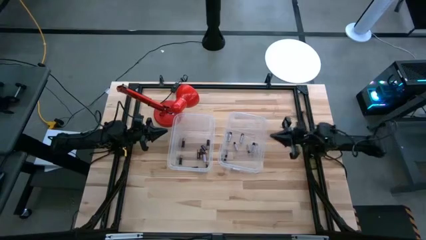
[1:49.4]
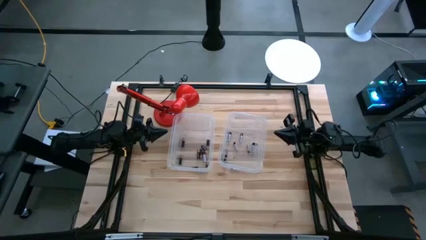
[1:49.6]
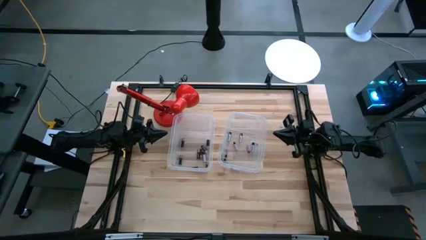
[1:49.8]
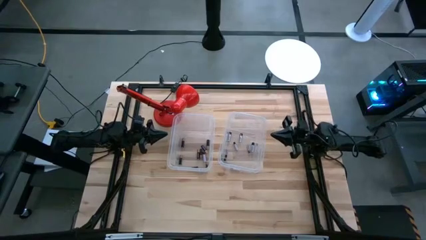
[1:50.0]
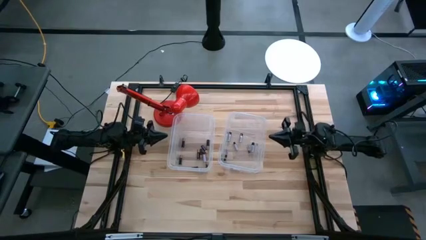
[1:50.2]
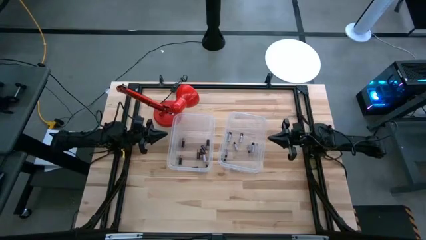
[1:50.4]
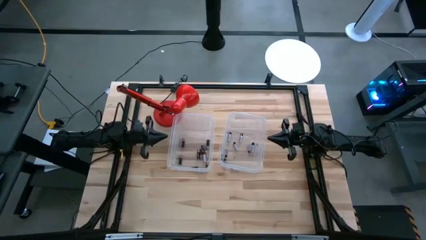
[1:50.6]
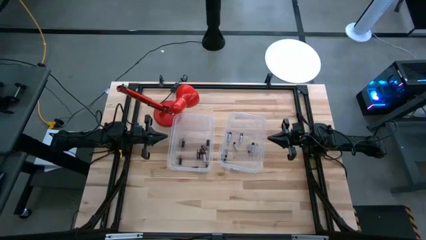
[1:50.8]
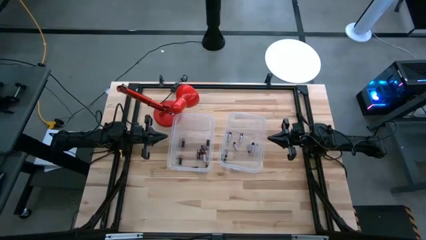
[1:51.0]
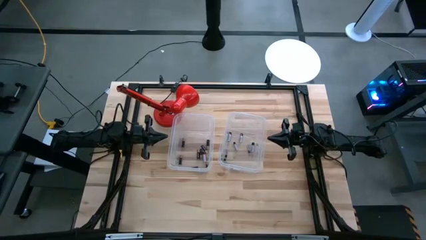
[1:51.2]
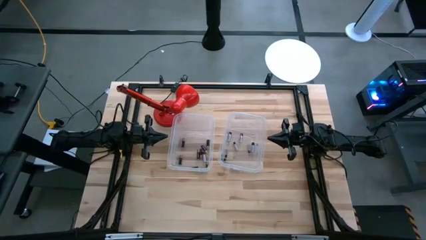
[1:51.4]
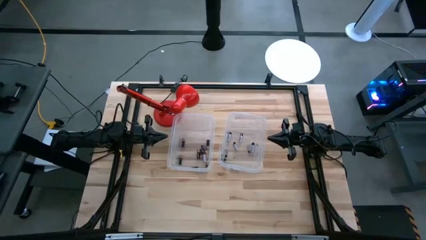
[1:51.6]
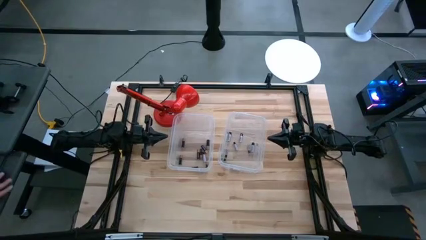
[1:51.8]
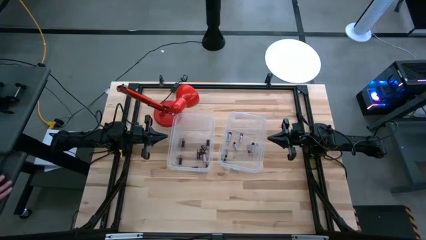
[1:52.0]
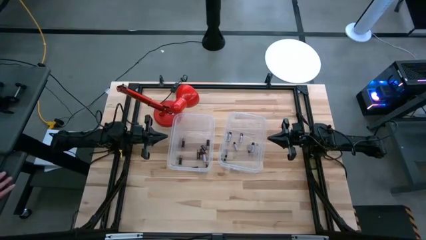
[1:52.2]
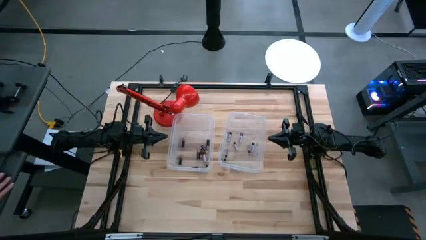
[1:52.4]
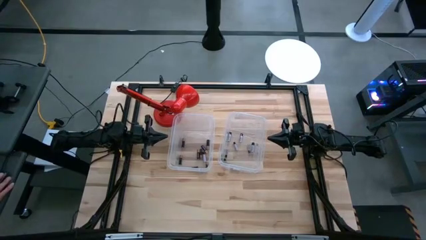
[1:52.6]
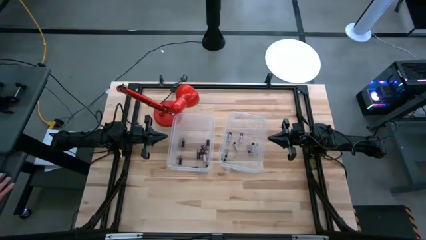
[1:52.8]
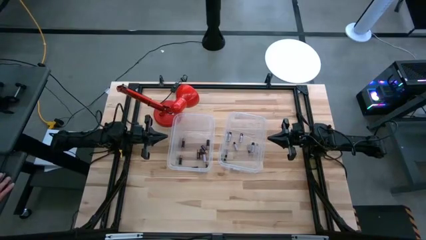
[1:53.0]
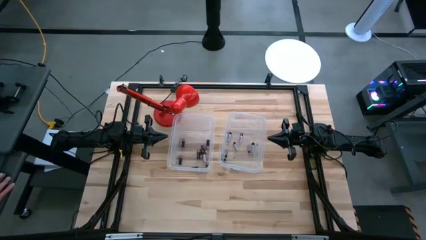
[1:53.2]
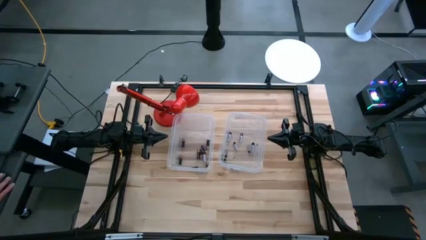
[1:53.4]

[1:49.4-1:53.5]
Task: Sort batteries
Return to Home Position

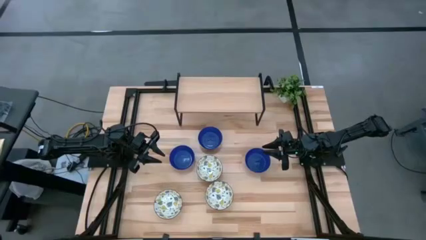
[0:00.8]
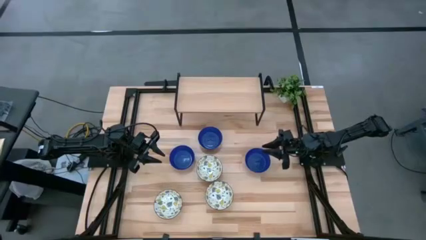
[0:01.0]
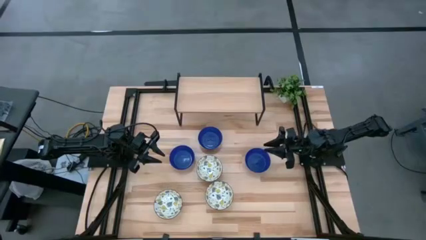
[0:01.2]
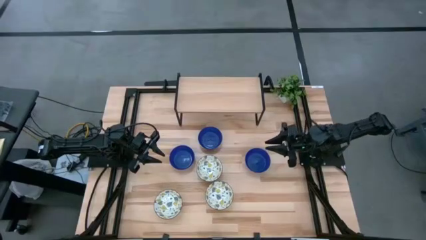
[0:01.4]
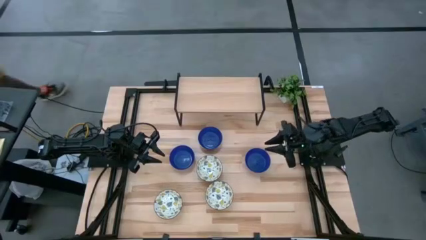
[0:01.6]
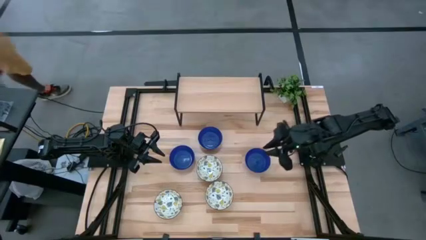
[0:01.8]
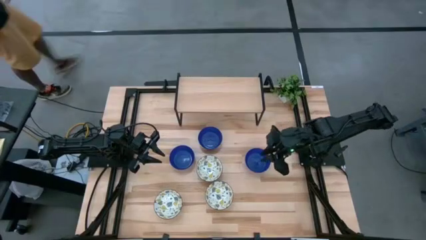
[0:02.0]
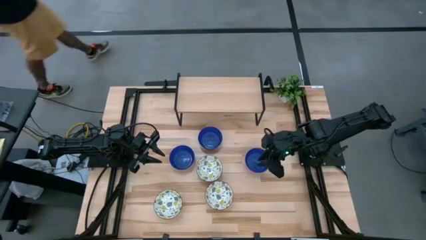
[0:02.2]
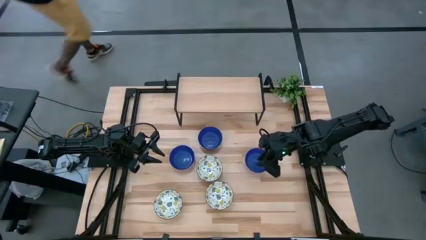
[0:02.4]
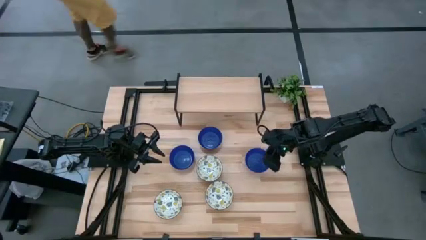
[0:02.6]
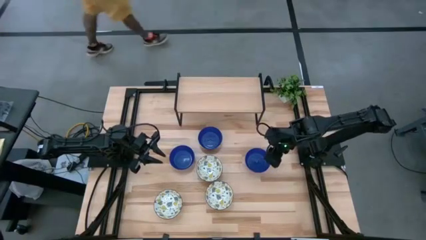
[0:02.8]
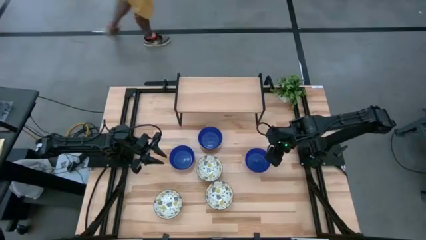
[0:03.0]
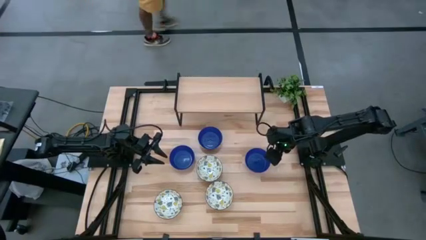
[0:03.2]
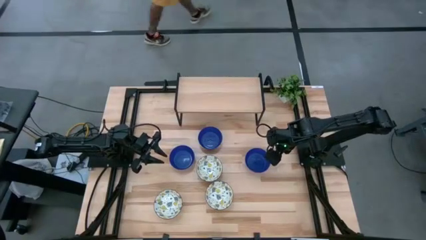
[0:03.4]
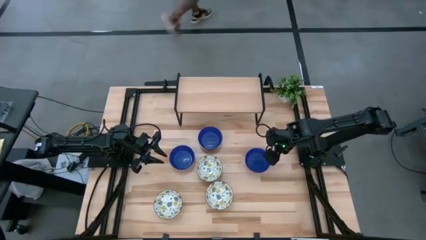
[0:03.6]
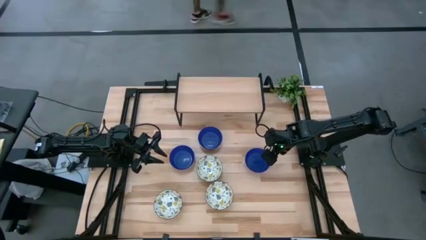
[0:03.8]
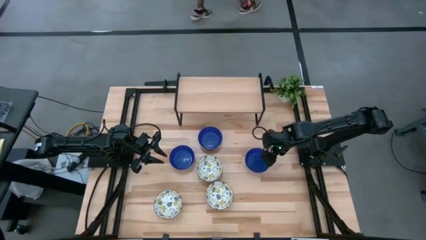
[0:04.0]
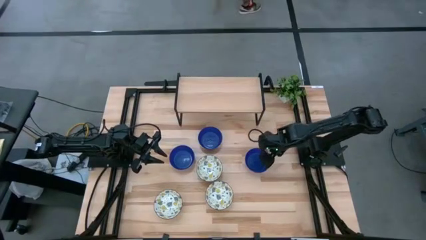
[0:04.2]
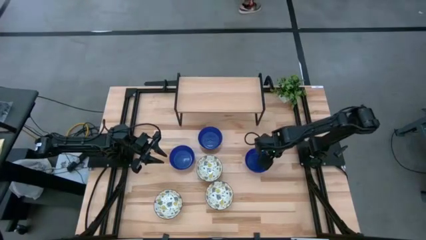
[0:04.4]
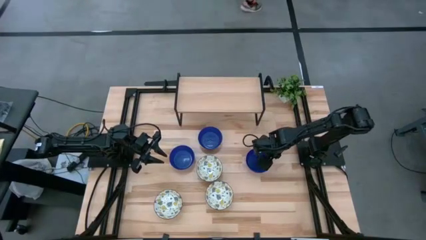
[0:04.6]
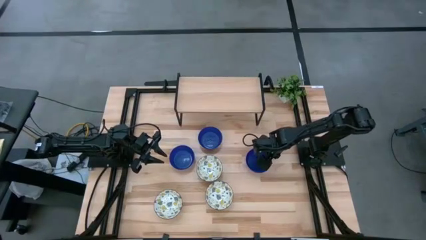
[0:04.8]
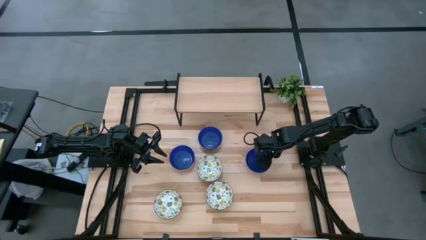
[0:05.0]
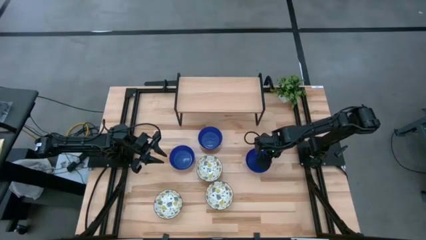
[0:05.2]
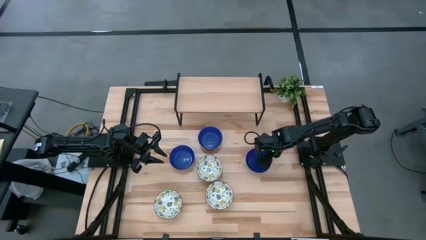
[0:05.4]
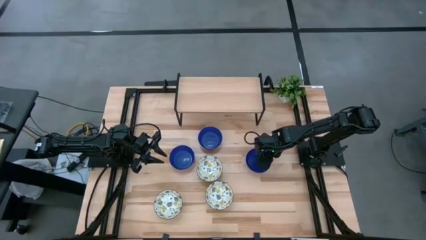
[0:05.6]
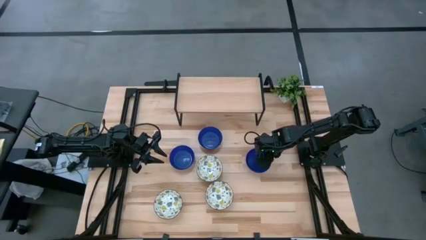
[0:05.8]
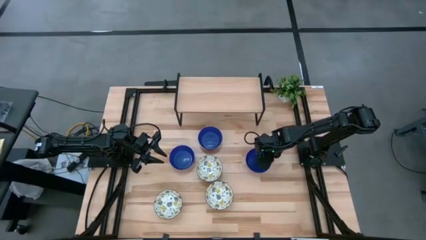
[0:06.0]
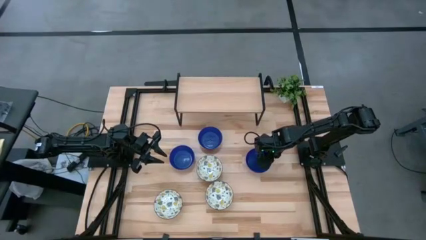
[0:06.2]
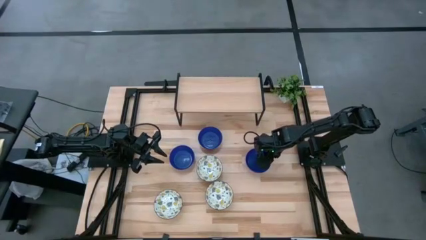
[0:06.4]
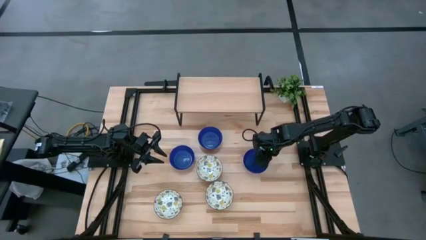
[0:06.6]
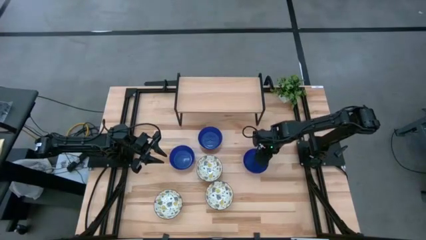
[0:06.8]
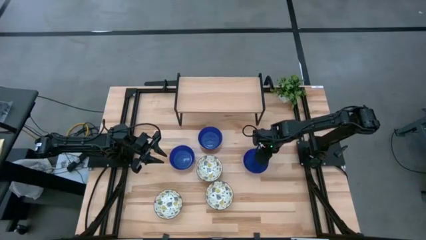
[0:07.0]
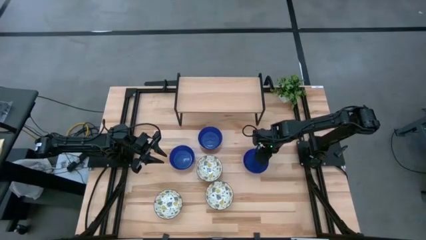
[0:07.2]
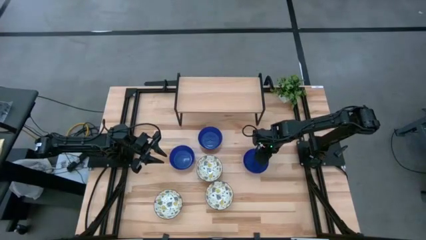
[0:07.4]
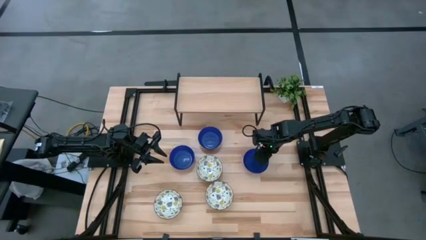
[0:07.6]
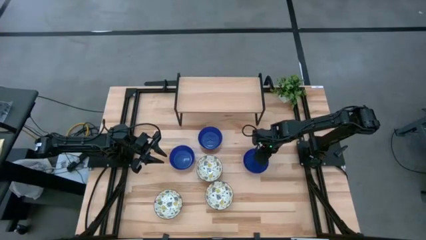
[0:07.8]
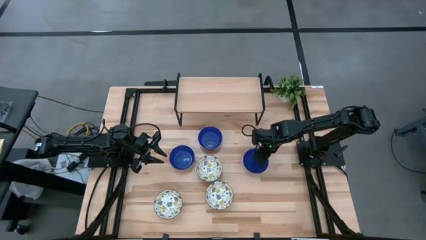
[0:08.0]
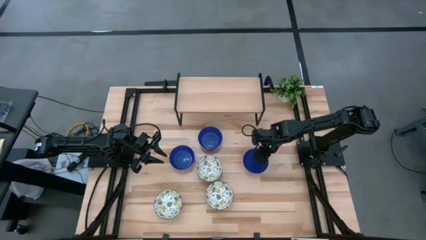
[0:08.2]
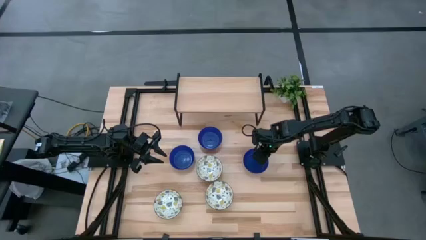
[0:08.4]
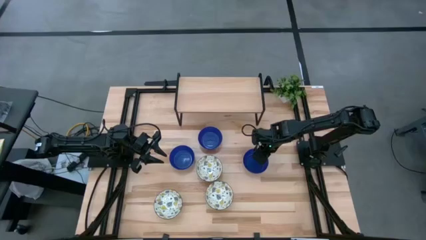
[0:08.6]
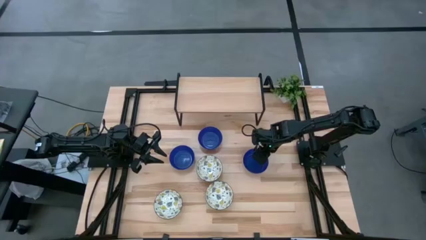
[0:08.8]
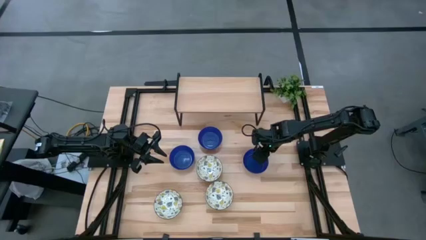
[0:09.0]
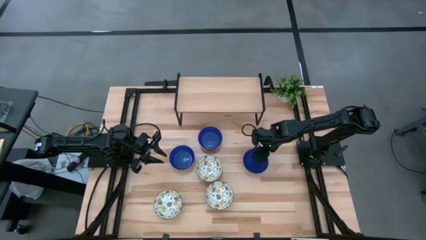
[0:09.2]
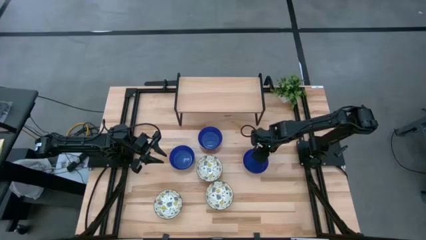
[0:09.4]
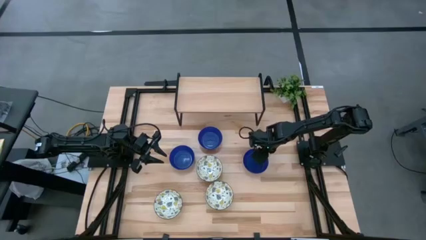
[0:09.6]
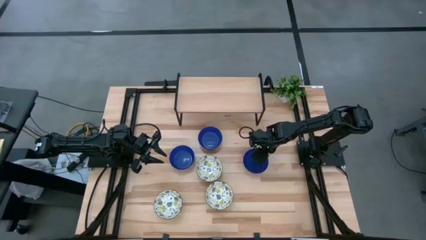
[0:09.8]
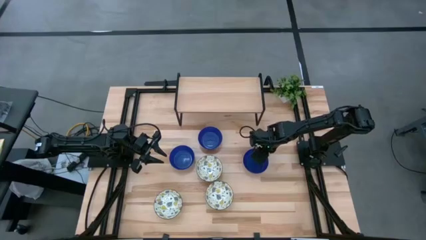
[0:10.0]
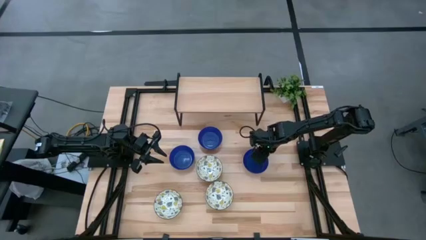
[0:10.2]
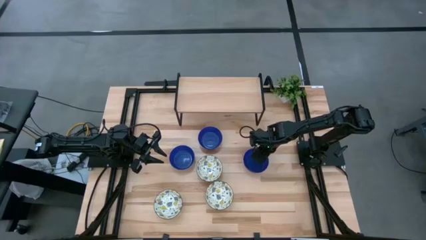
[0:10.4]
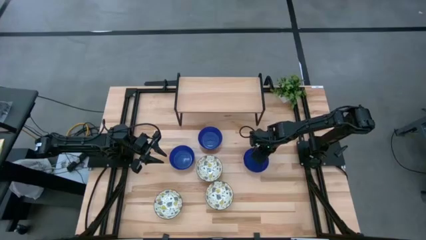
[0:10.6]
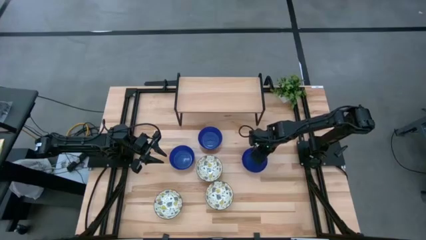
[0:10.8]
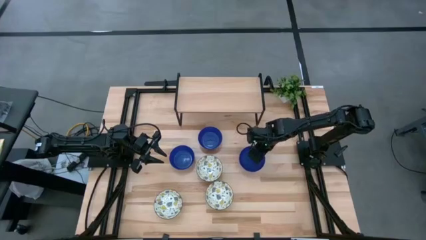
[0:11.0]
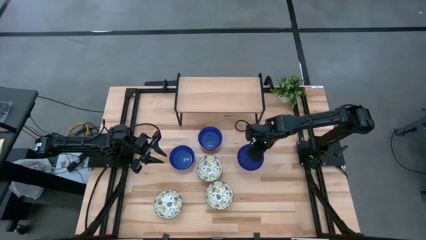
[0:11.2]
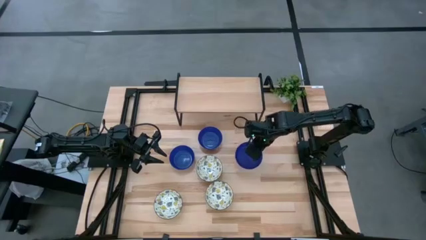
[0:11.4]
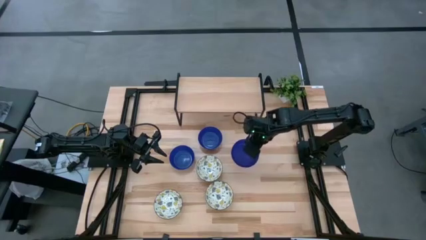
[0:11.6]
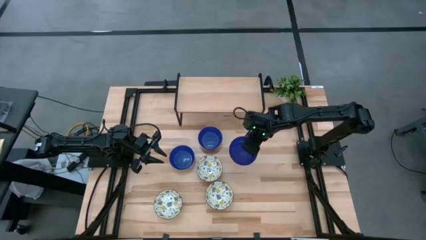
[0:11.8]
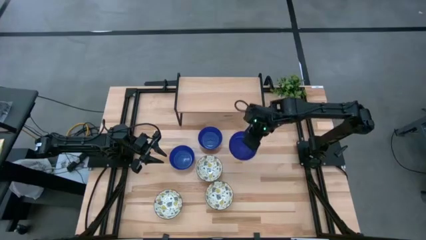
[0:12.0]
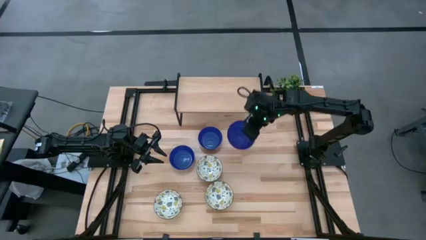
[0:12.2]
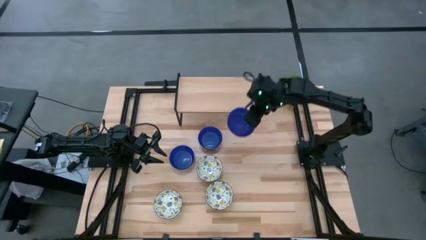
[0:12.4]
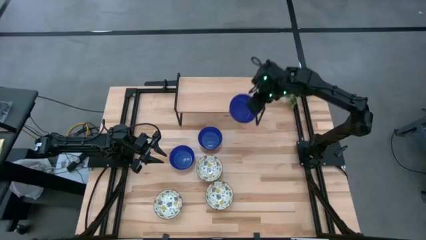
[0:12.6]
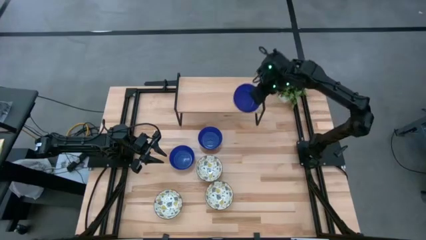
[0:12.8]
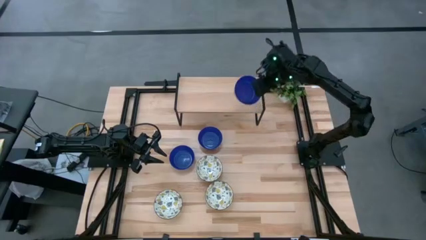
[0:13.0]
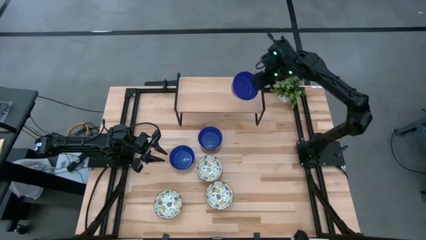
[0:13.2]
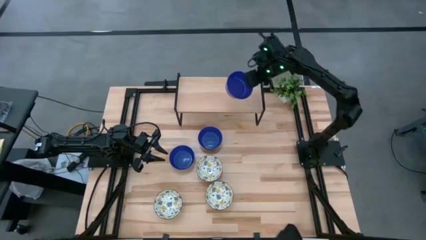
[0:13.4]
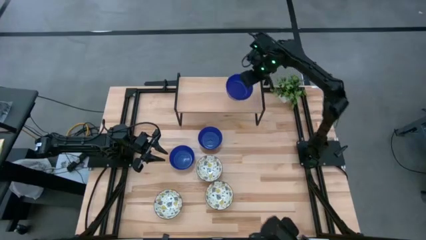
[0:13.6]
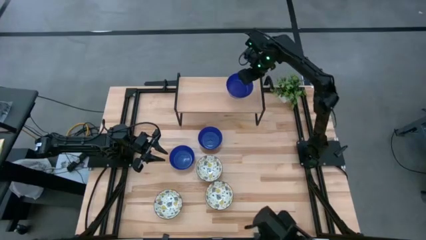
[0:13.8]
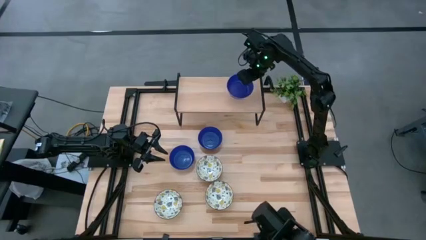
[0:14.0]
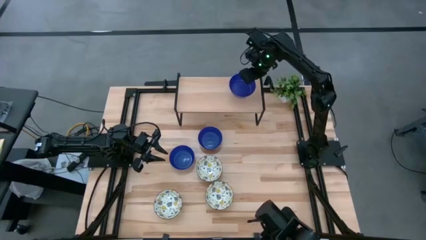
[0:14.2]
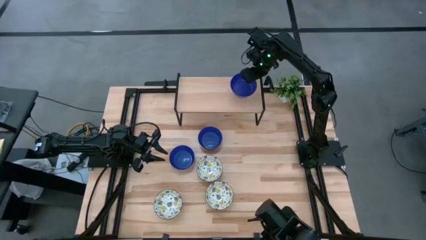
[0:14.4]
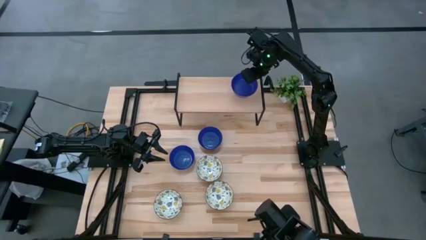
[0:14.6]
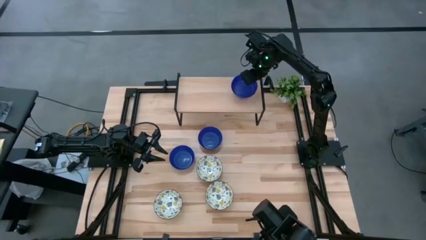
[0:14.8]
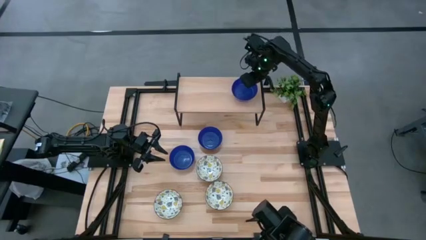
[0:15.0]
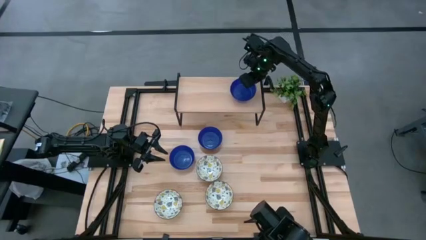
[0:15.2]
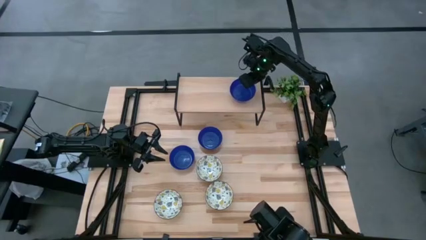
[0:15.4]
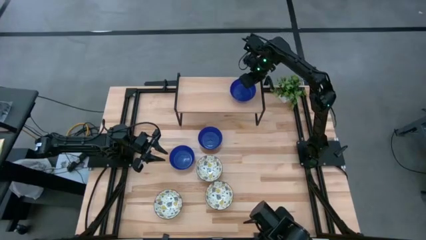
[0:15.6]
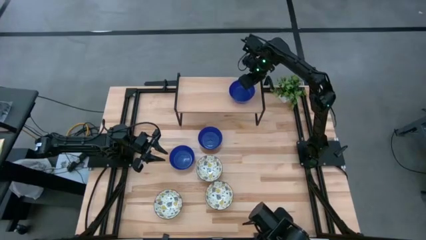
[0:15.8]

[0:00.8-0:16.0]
Task: Pick & Place Mini bowls
Put the right blue bowl on the shelf
